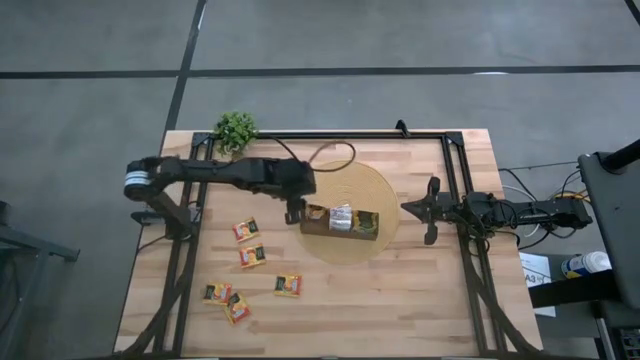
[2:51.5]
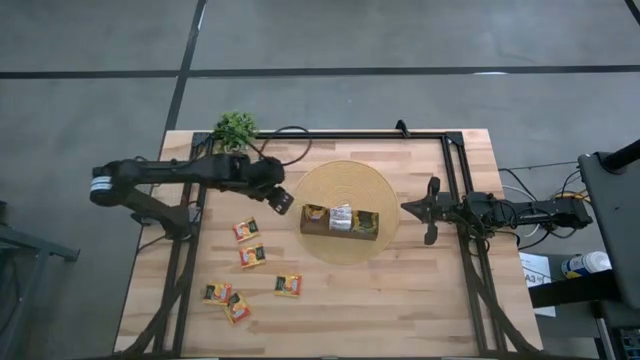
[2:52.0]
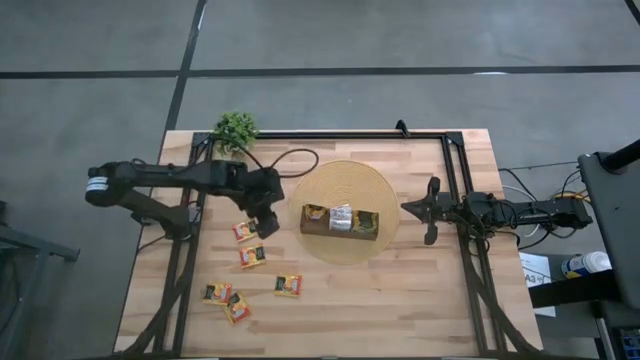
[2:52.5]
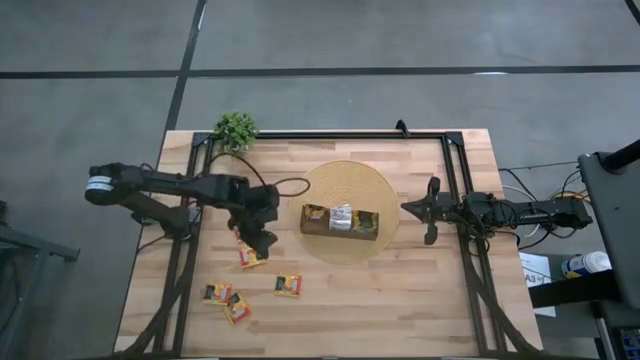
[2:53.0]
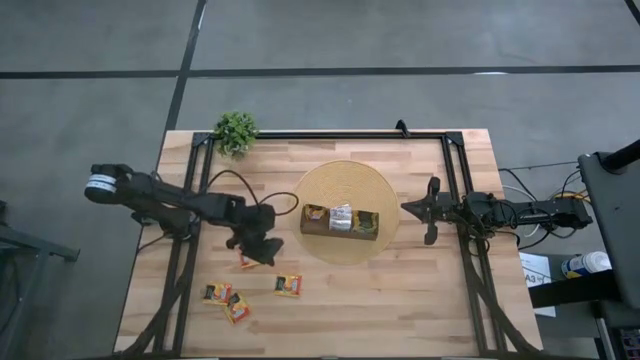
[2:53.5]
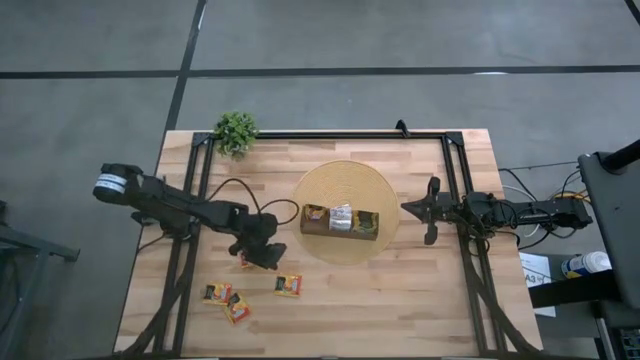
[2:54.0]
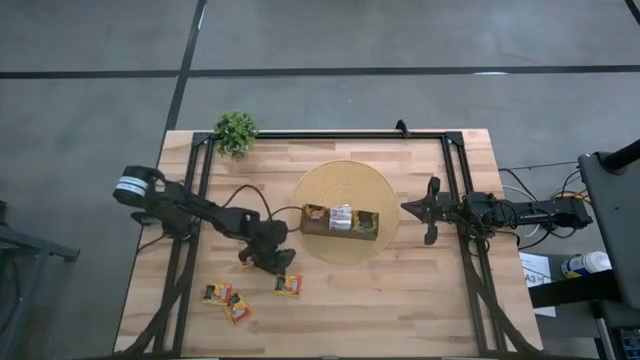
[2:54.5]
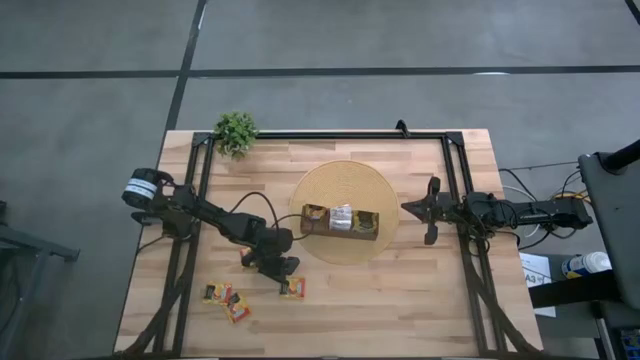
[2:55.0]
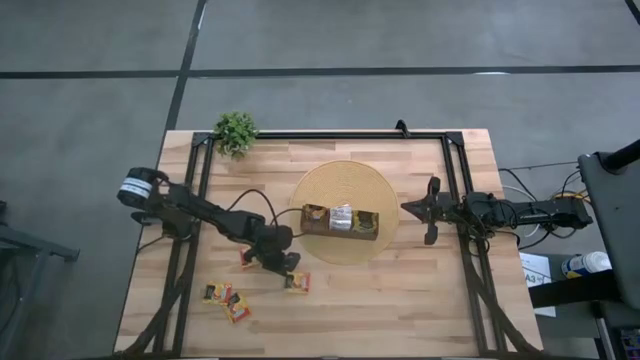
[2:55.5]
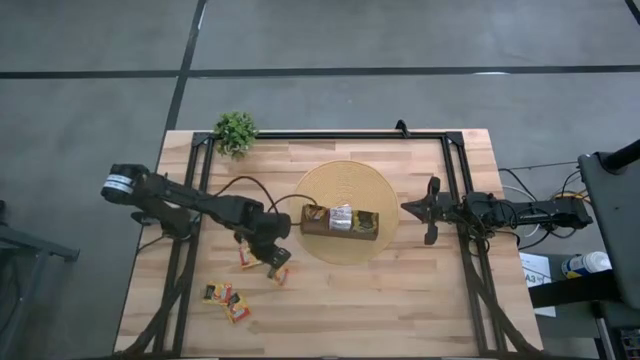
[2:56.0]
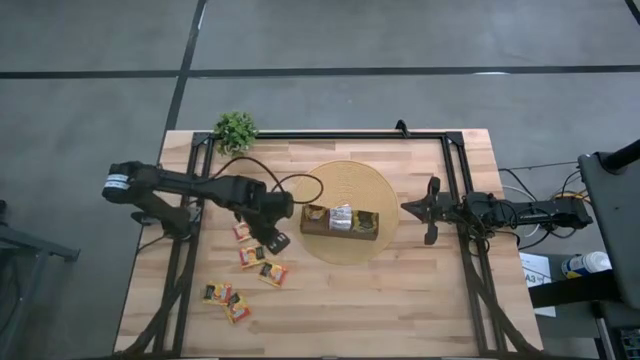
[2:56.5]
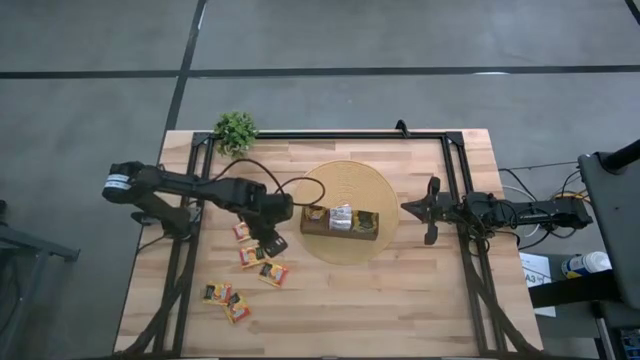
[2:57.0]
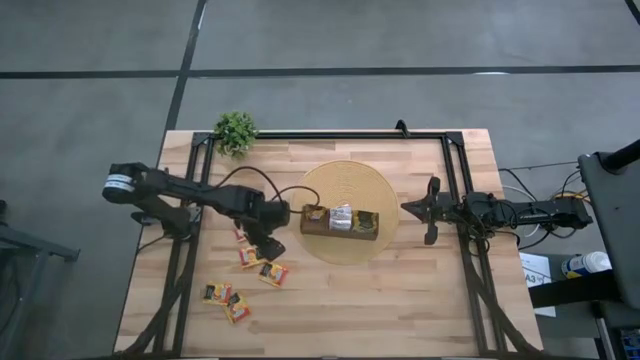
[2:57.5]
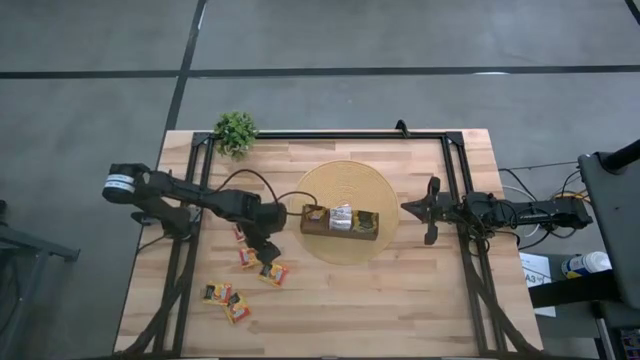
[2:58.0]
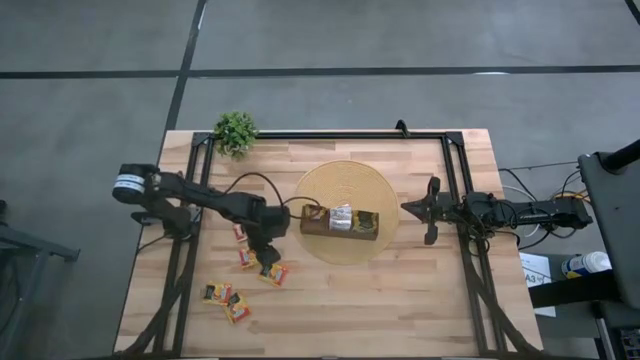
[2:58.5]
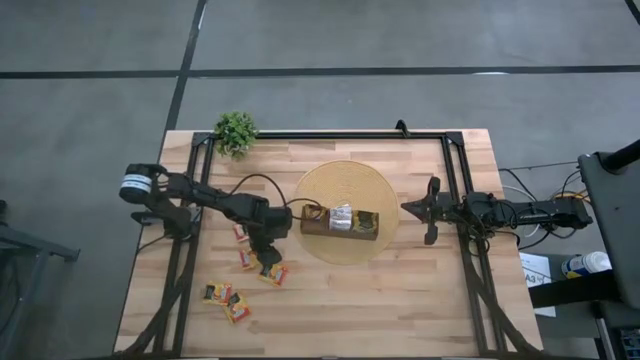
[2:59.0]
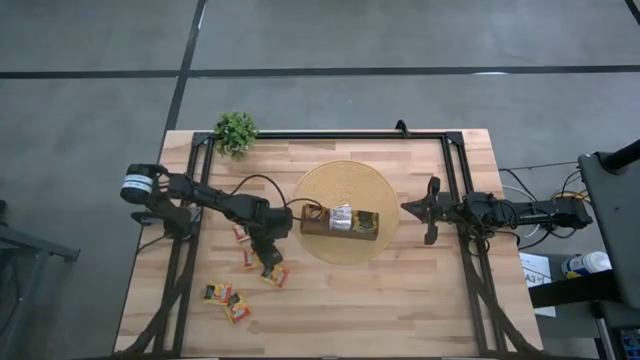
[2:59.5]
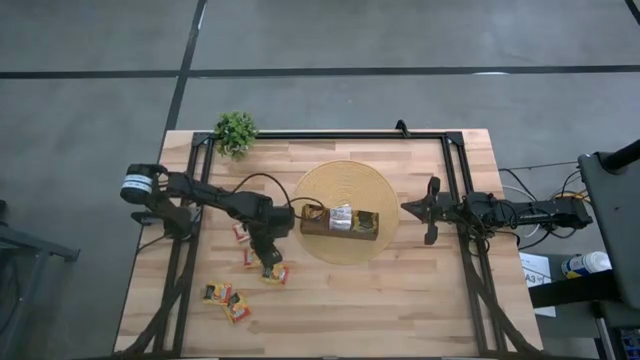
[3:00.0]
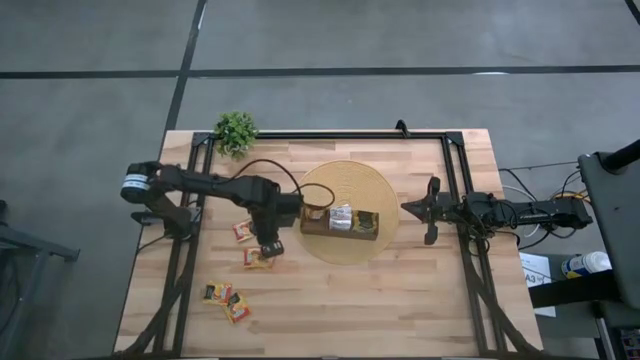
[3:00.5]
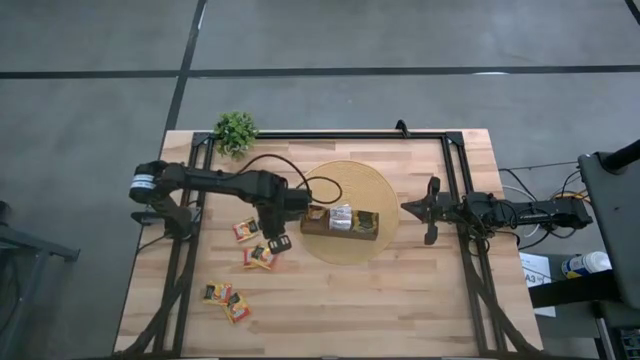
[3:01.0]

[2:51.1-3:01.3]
Task: Pick & Place Tea
Put the orange tea bag into the left section of the wooden organizer

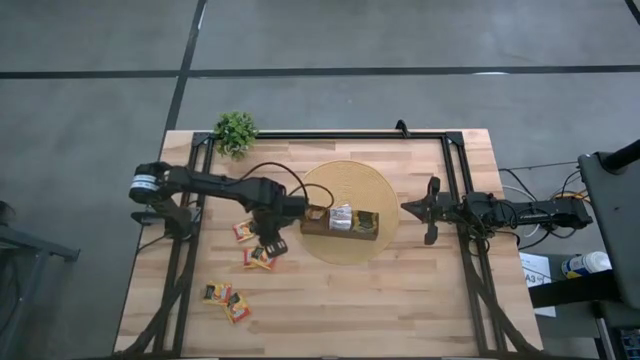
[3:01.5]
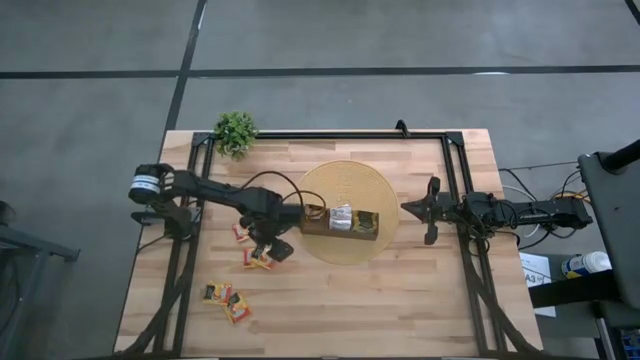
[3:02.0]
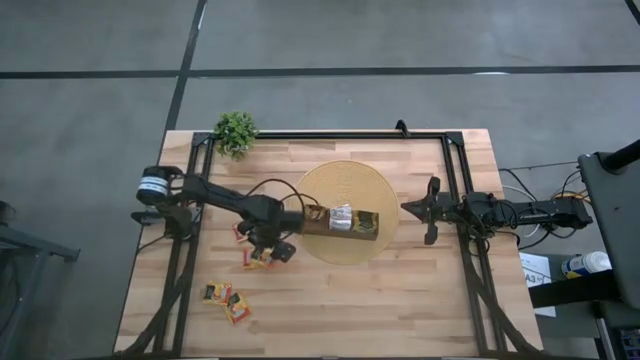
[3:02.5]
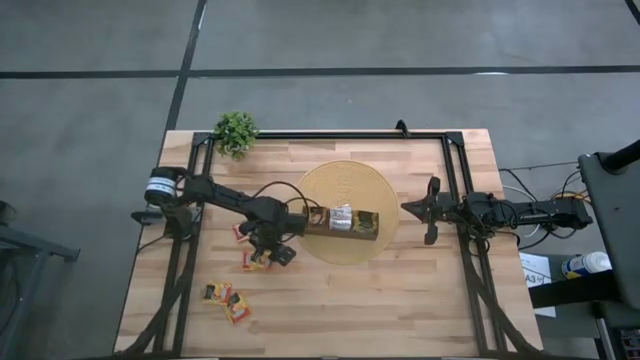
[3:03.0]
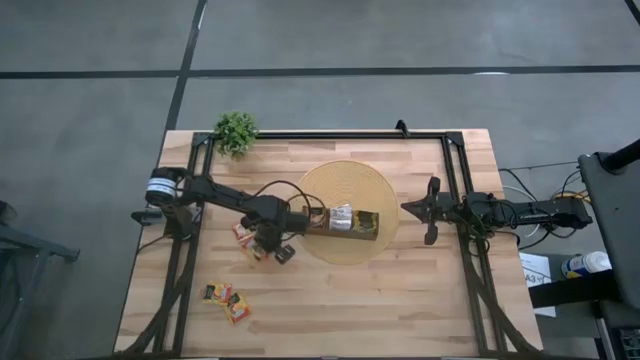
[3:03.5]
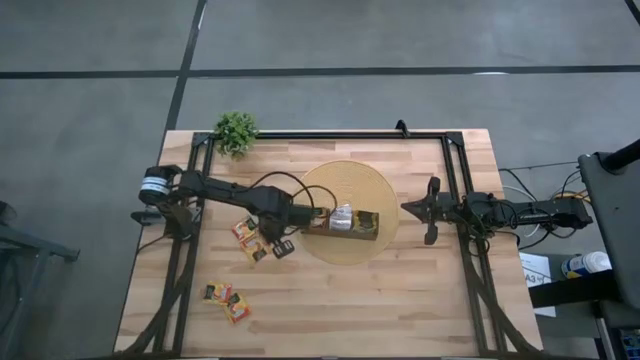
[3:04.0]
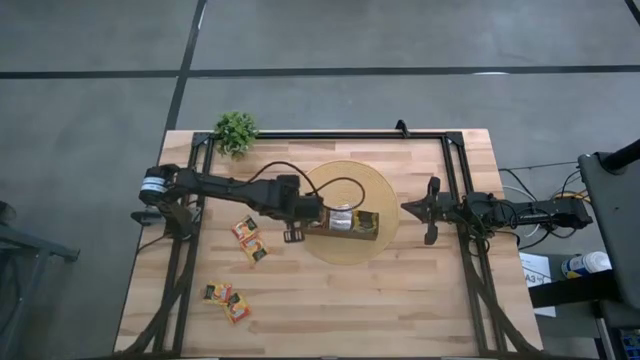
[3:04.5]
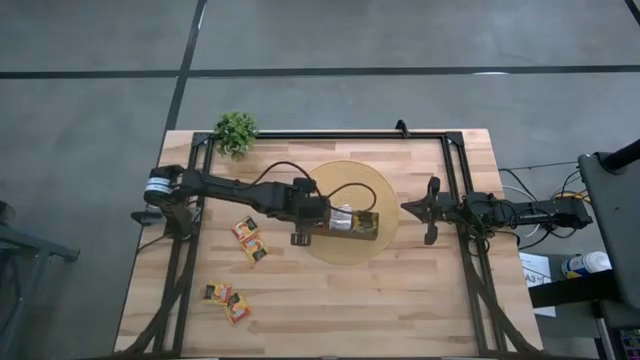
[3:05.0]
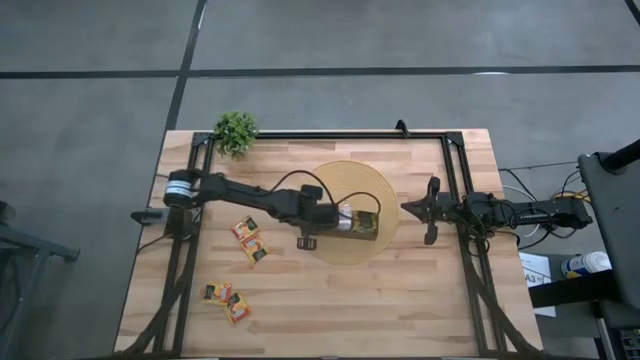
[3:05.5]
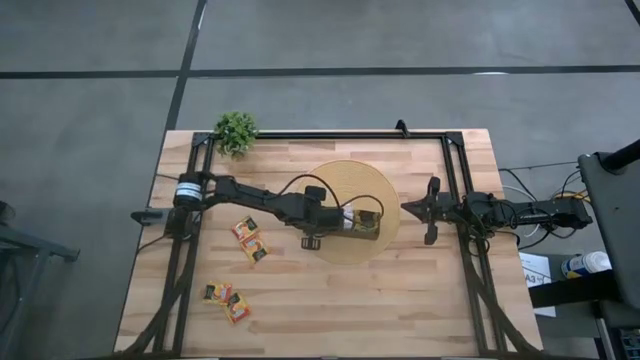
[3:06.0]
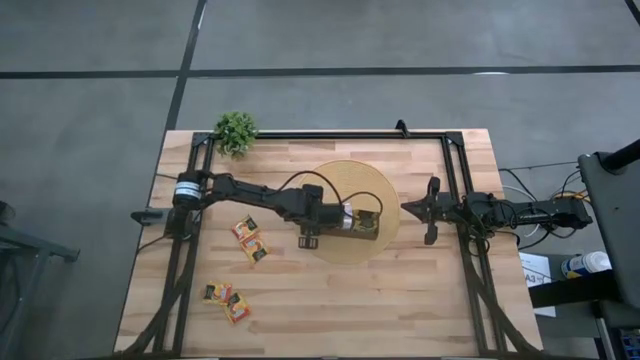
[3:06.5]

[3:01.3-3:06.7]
Put the orange tea bag into the left section of the wooden organizer

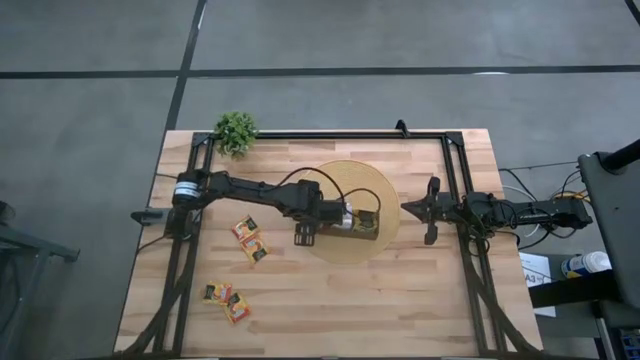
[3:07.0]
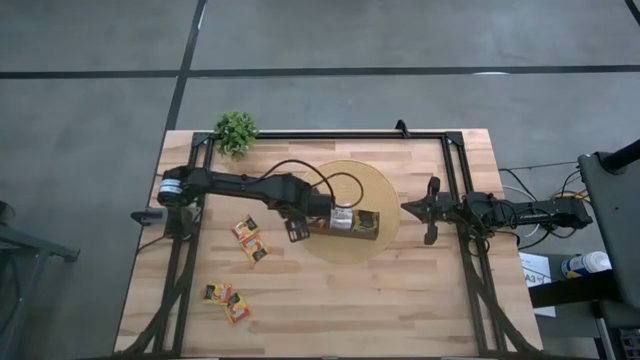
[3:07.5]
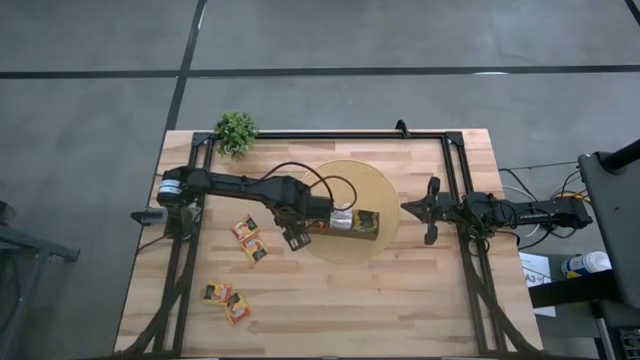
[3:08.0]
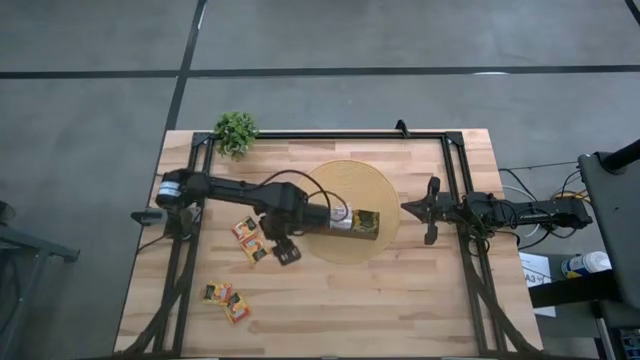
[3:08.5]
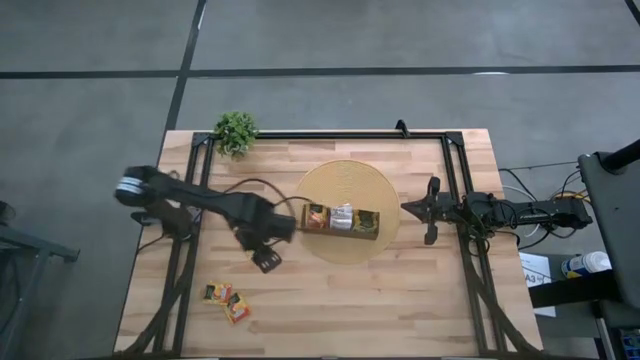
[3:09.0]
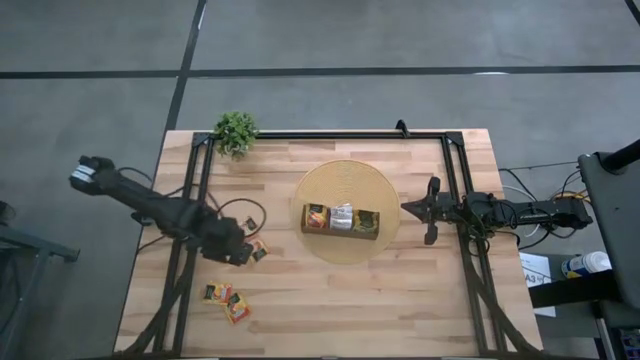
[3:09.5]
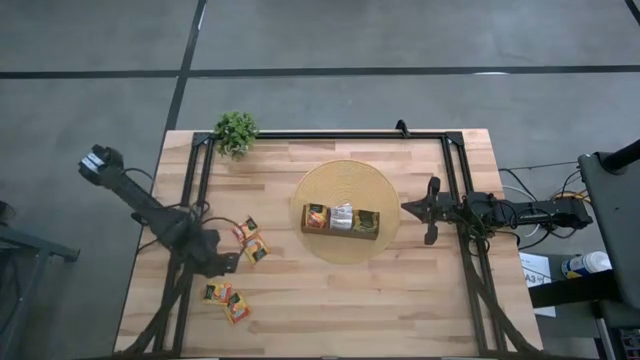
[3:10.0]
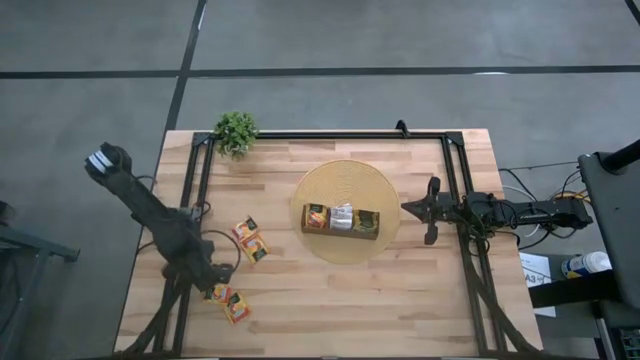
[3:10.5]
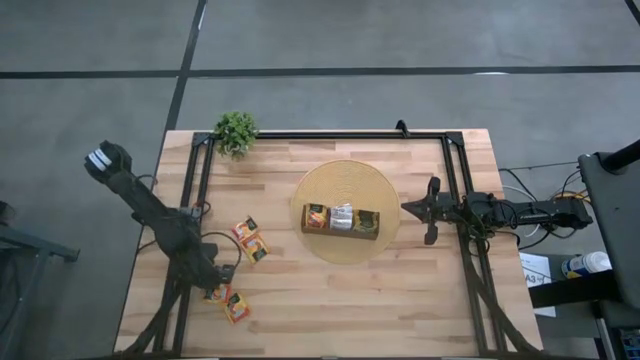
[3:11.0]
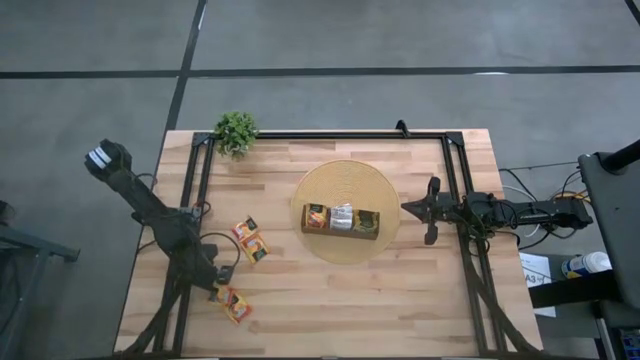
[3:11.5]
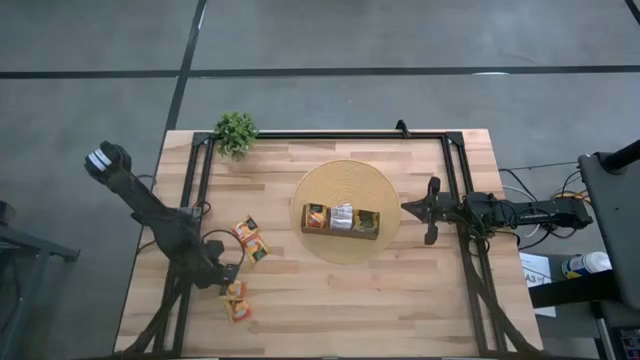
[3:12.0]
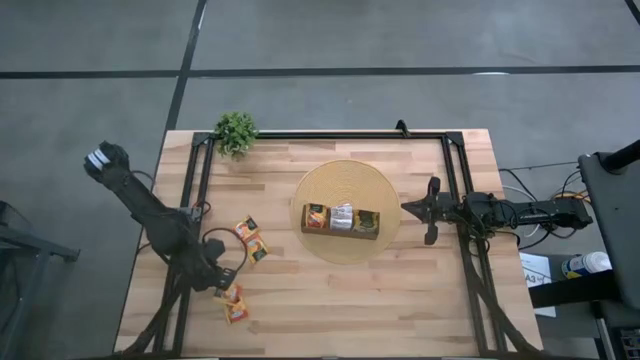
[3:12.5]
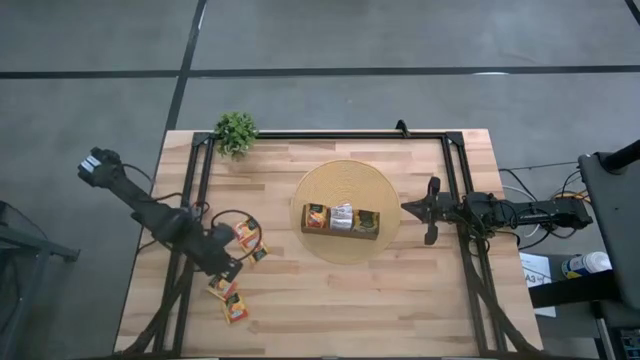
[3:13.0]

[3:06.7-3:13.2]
Put the orange tea bag into the left section of the wooden organizer
